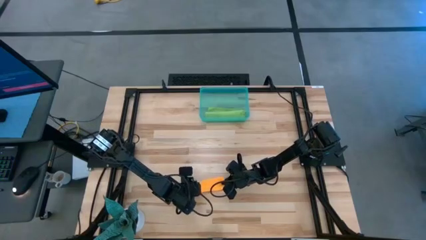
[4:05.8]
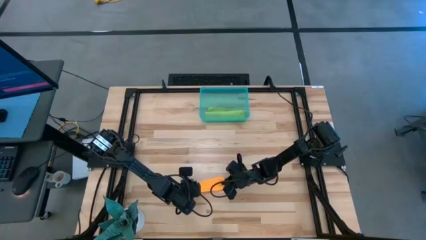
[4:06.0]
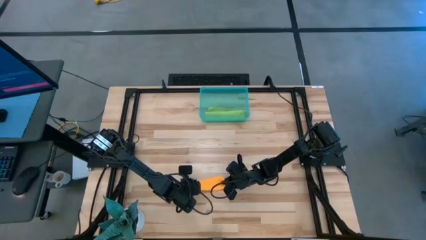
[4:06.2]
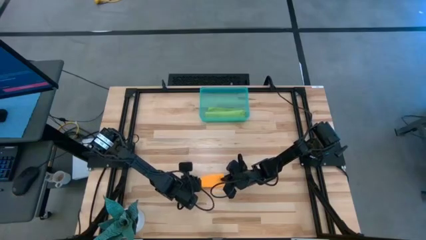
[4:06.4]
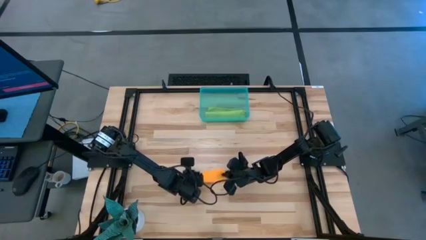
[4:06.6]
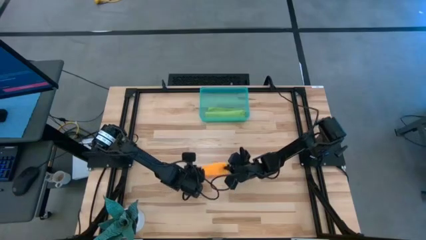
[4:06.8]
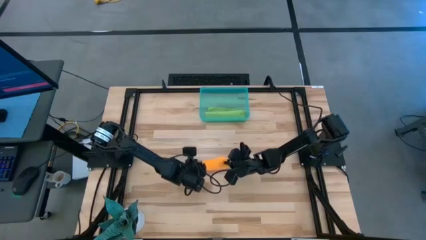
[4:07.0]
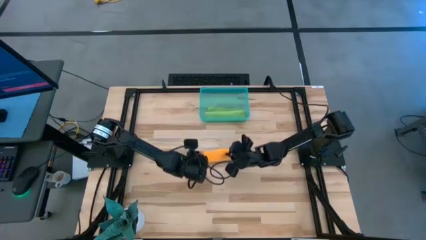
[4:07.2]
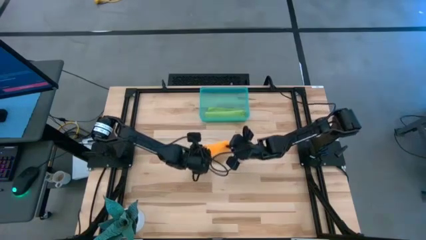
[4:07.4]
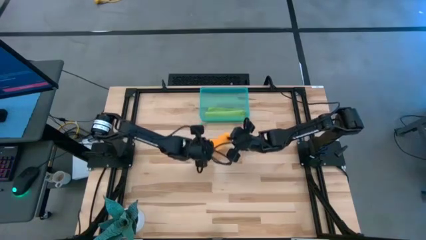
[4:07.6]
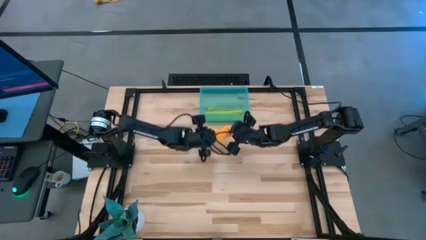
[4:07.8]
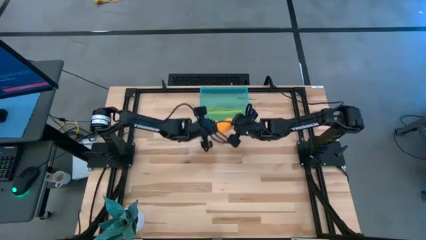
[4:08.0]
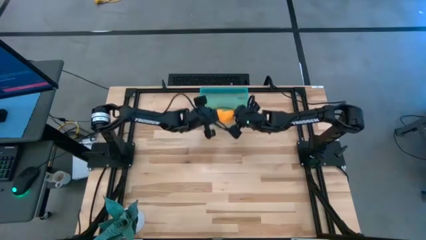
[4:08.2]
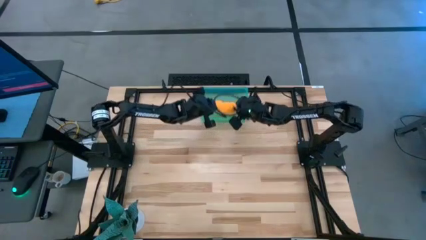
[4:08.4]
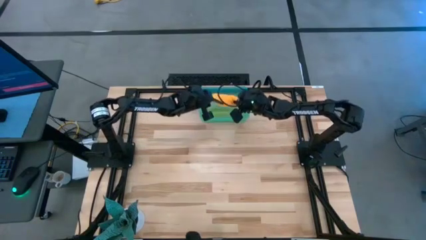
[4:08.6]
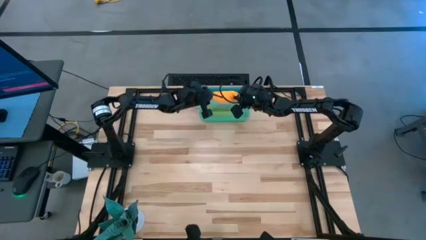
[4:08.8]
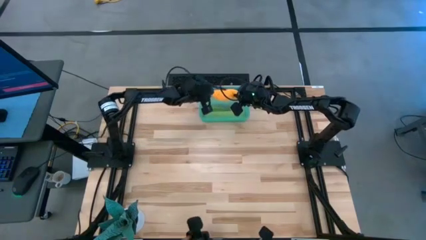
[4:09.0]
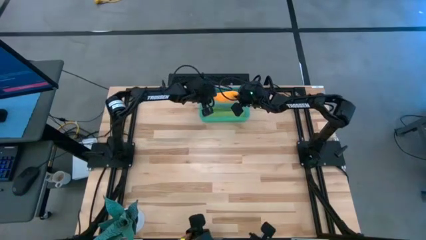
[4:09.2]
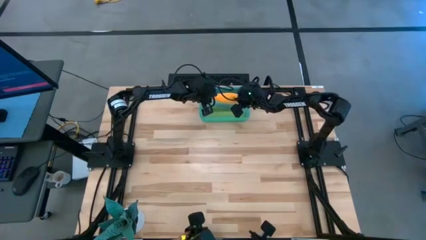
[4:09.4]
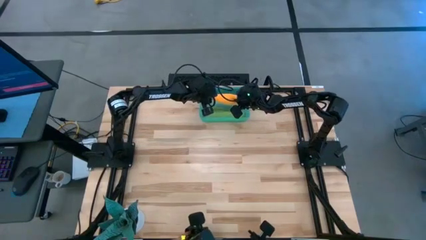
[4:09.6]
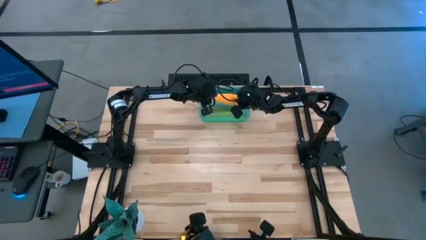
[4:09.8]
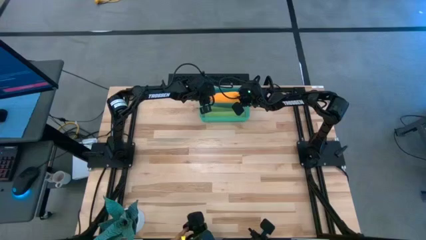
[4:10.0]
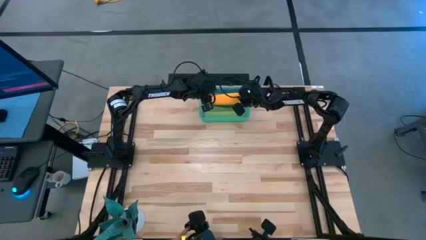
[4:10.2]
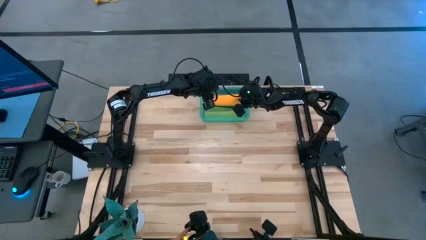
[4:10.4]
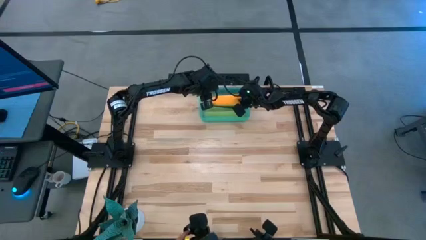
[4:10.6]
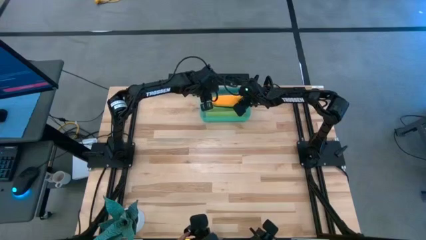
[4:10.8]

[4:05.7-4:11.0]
Task: Roll microfiber towels into tight, uniform cylinder then place into a basket
Put the yellow microfiber towel into the blue bin

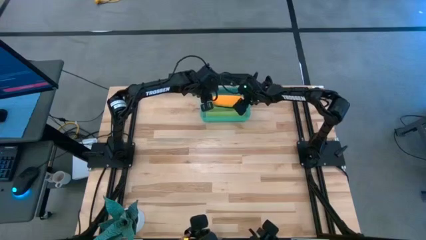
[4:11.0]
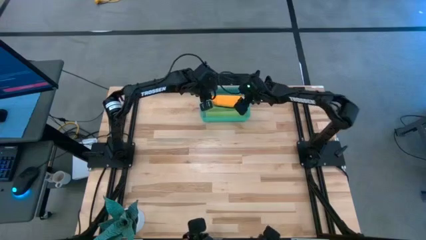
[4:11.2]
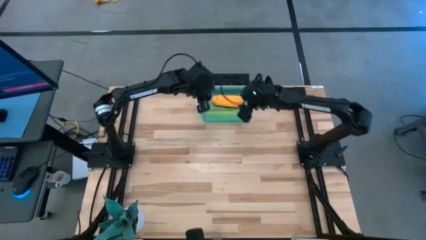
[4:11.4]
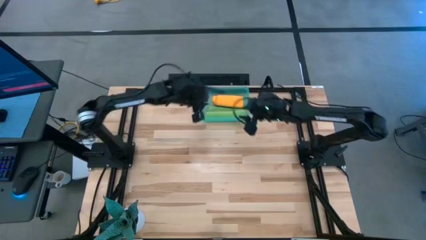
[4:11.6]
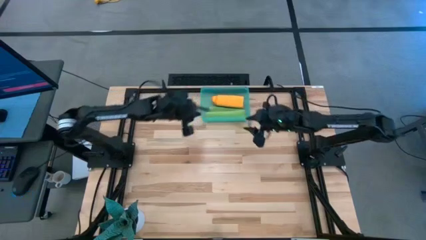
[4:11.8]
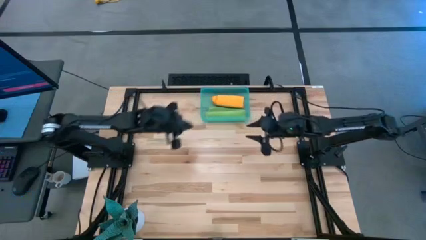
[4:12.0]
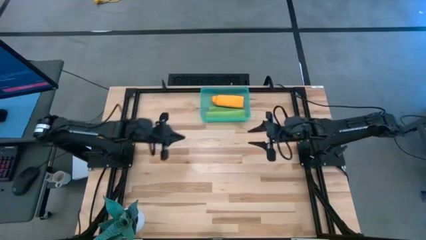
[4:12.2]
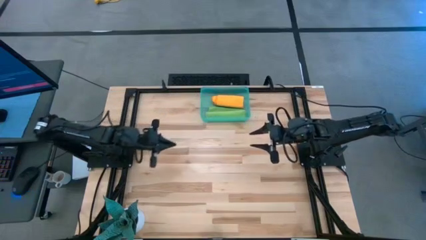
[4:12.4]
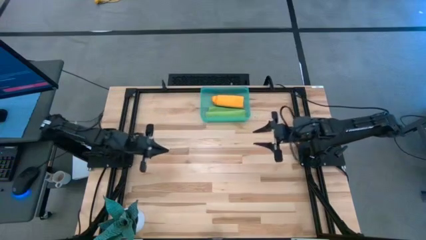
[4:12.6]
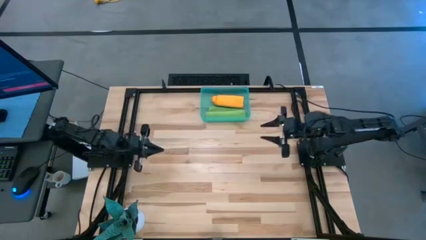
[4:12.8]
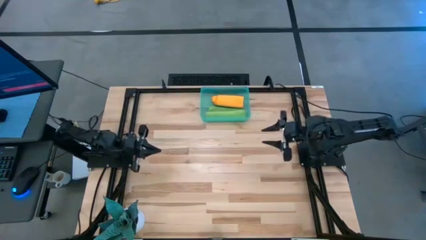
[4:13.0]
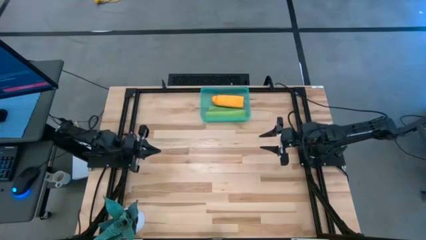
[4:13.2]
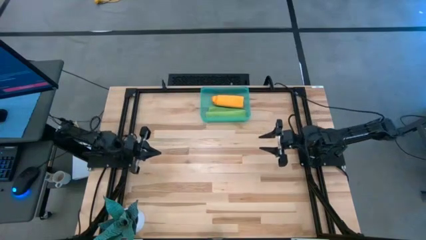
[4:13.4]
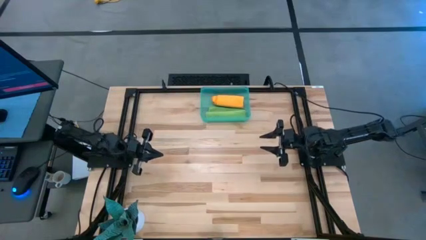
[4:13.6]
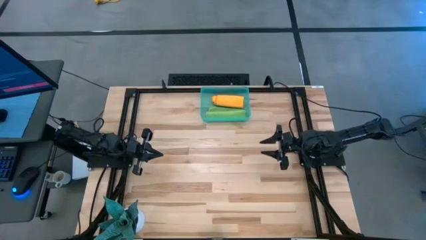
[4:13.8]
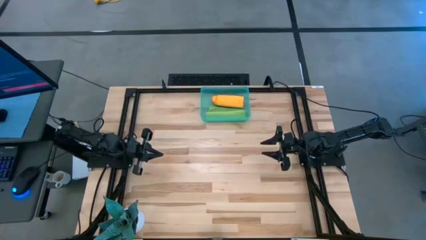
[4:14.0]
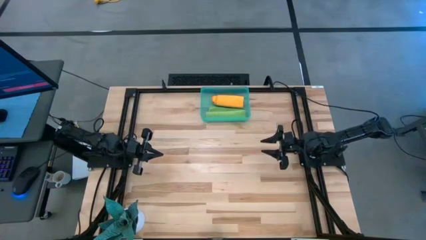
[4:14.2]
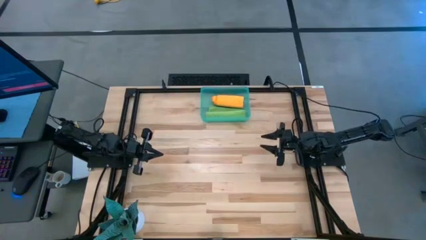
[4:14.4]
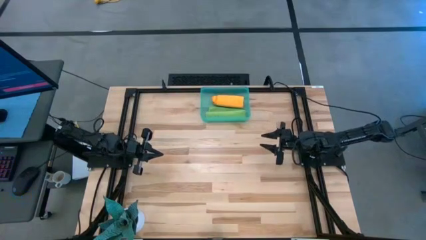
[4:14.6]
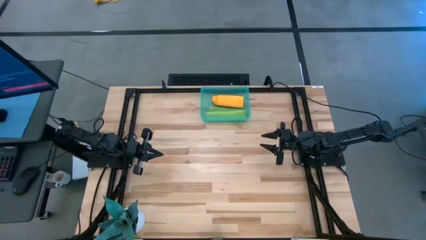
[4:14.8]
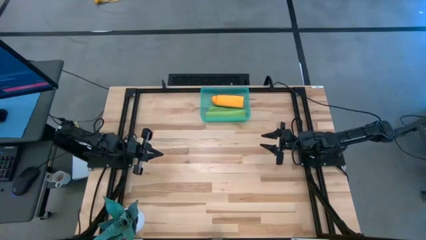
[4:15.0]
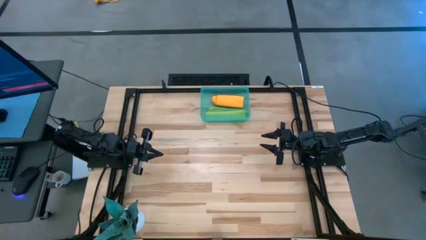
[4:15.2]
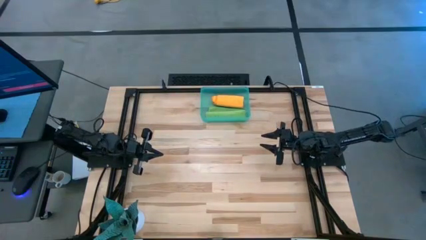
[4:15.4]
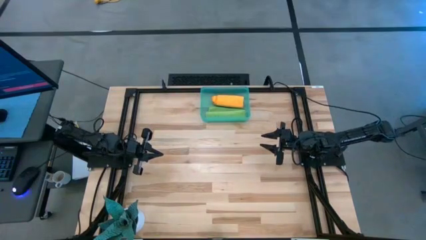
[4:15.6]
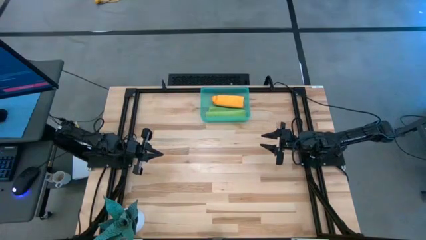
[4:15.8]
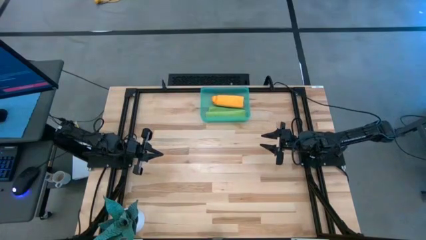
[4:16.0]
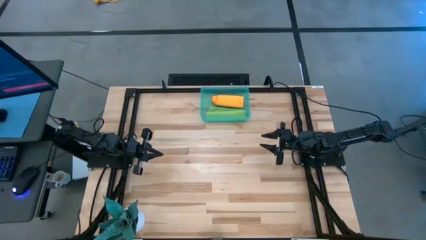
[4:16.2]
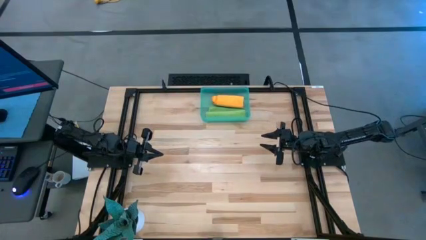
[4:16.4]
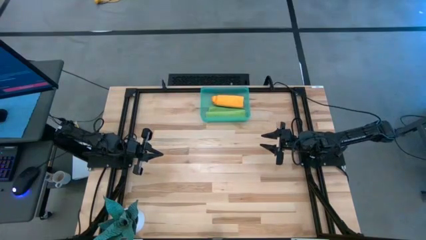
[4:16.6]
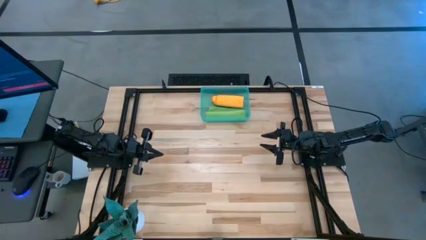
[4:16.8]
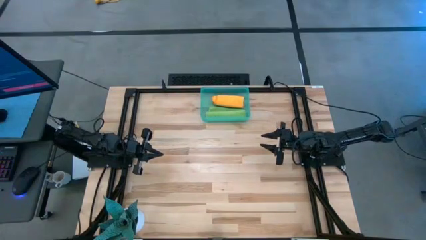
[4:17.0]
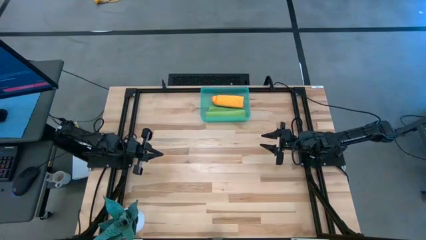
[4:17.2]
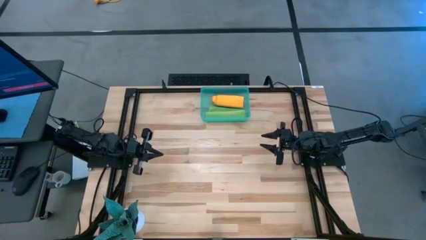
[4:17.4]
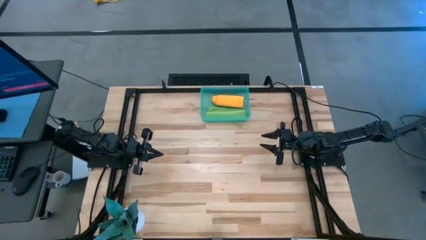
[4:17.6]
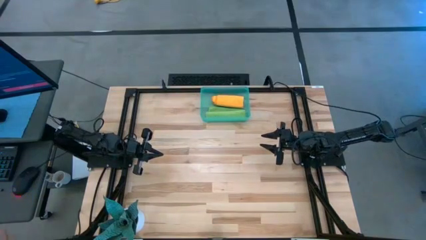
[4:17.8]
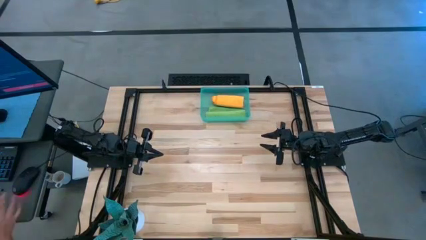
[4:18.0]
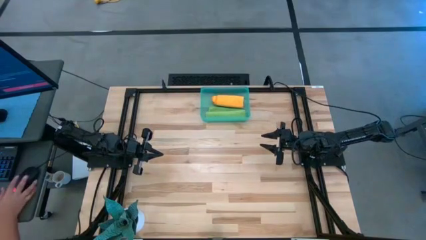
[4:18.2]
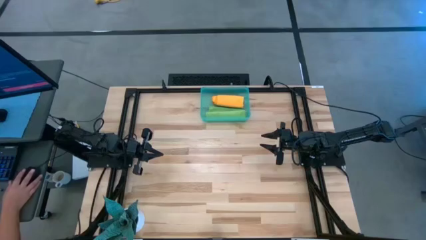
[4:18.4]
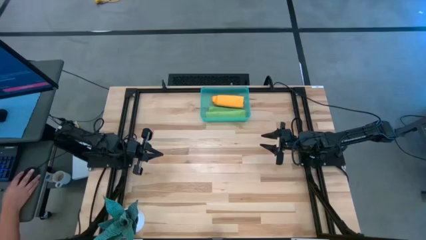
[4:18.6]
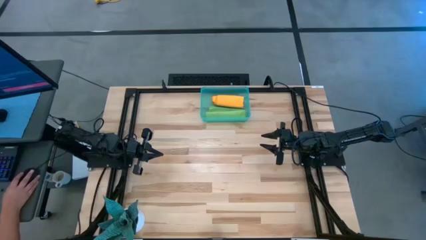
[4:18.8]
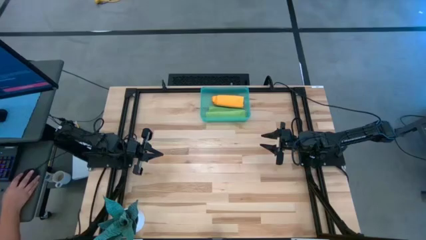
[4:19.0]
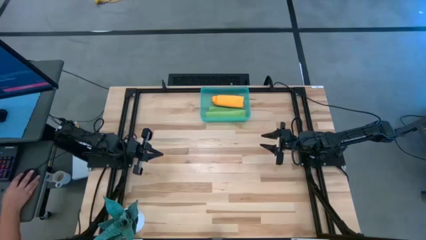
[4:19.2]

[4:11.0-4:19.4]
Return to Home Position
